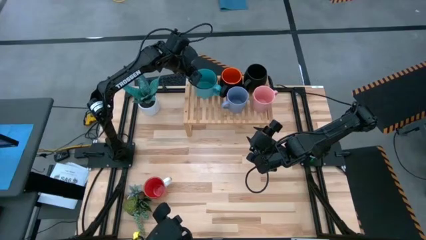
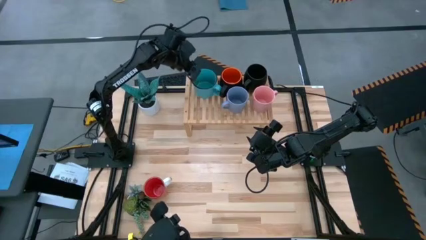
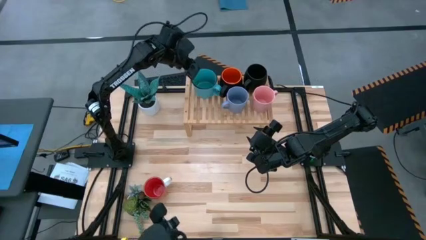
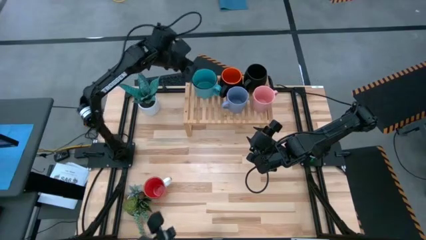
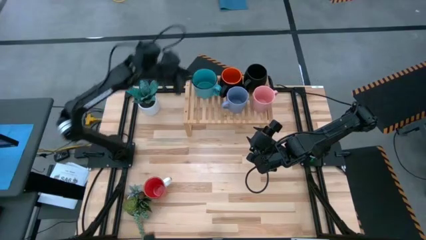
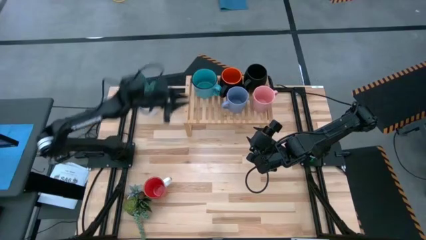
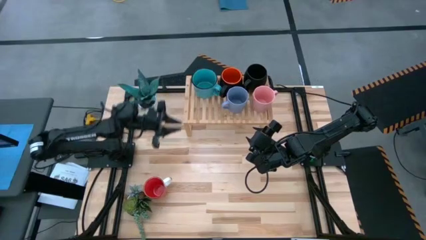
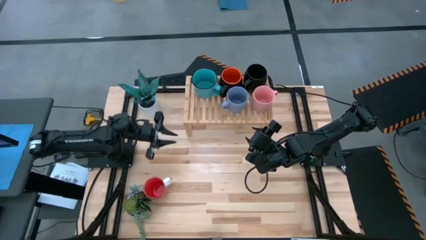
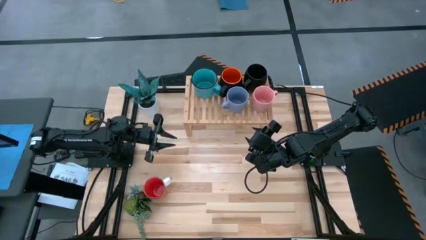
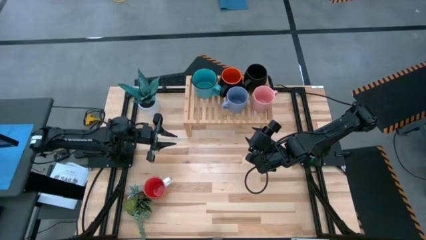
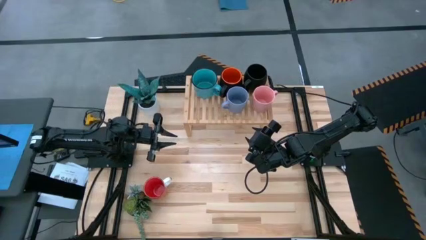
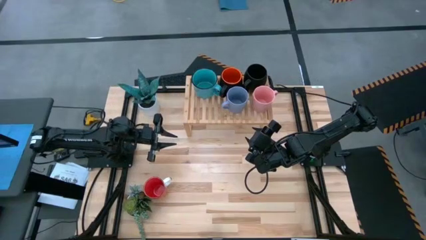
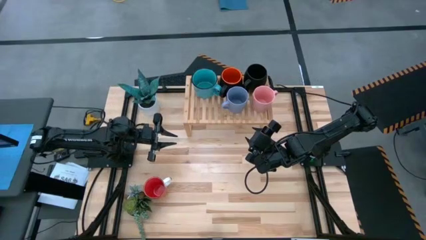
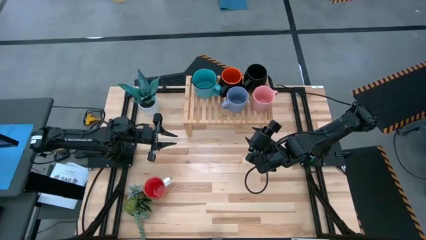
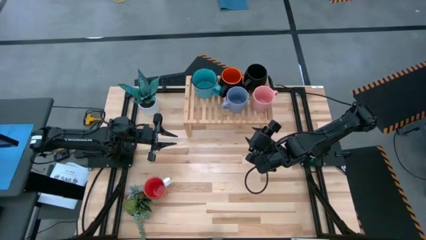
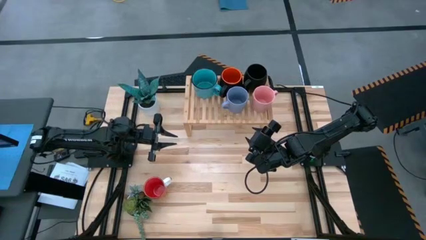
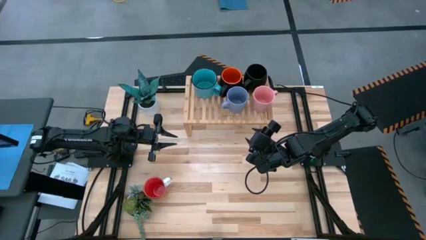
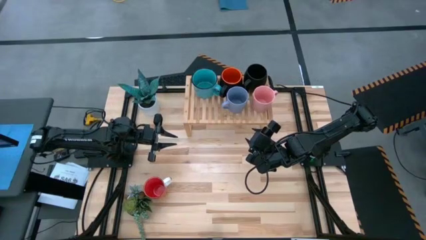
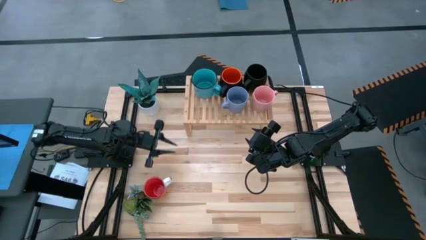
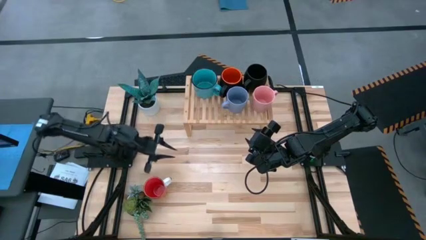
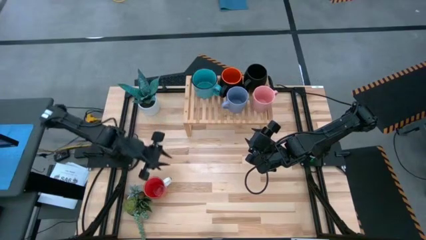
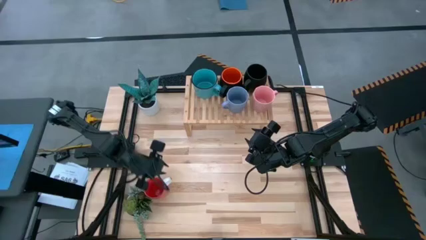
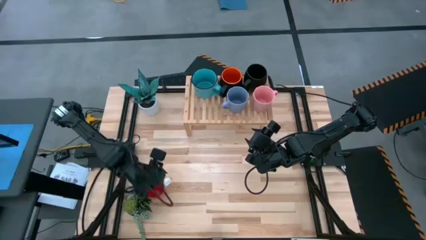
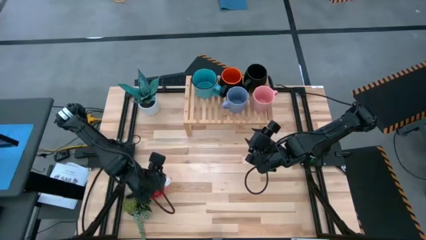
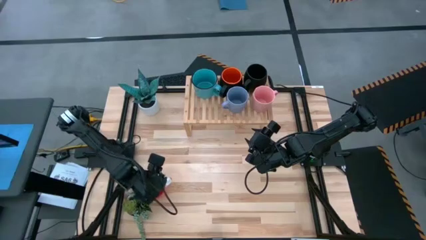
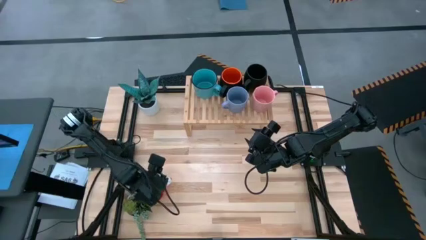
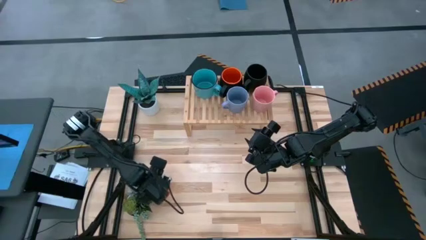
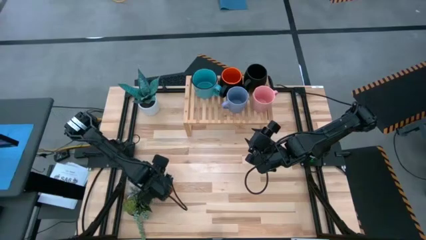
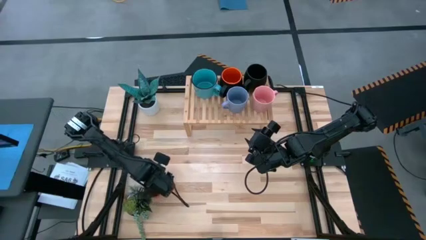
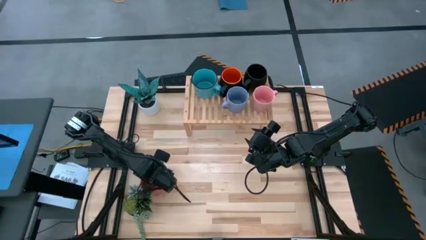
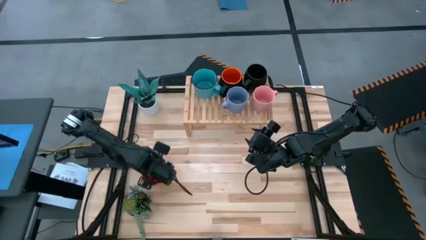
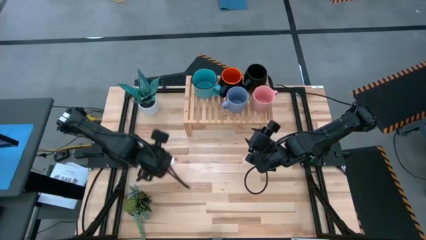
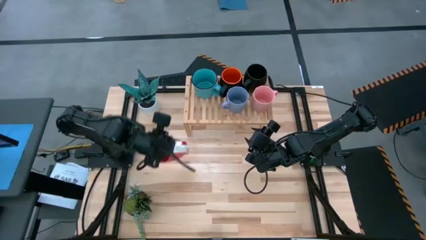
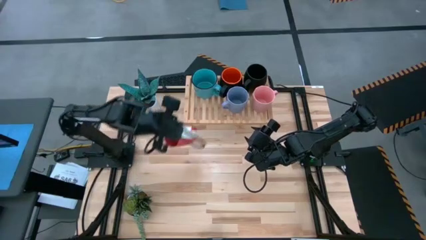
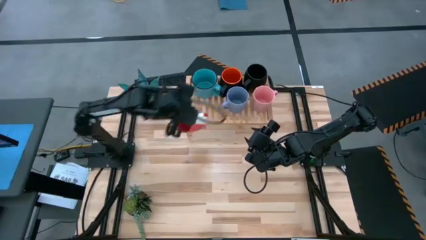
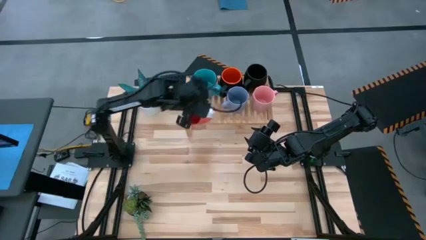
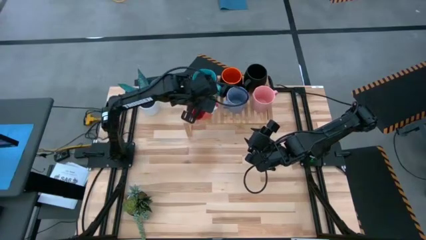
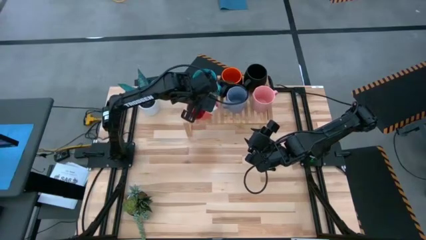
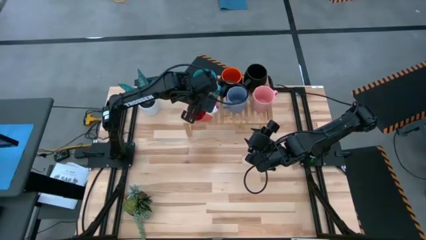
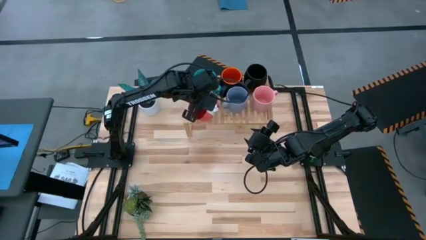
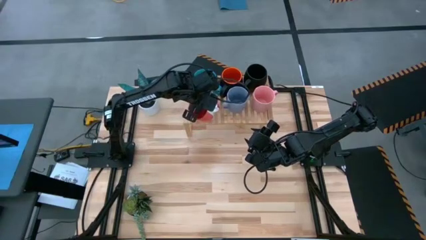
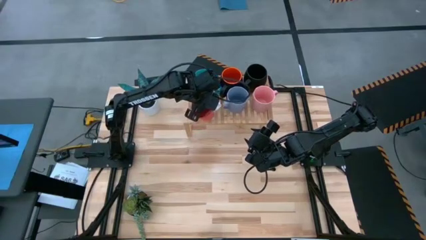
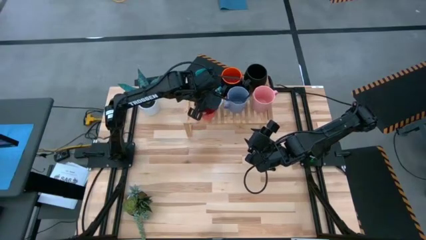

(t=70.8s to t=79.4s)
Task: Place coffee mugs
Put the red mug on the shelf

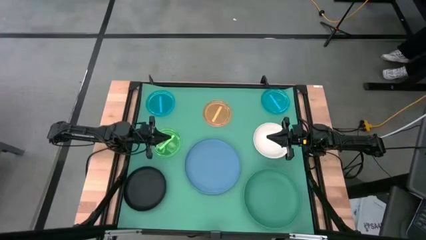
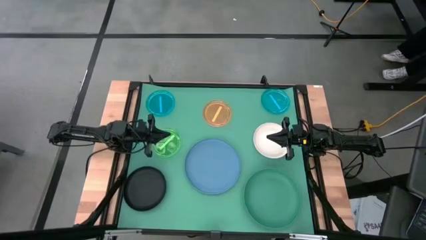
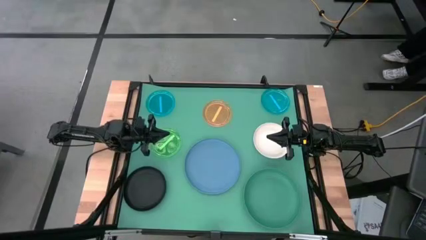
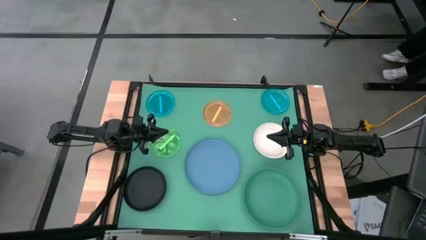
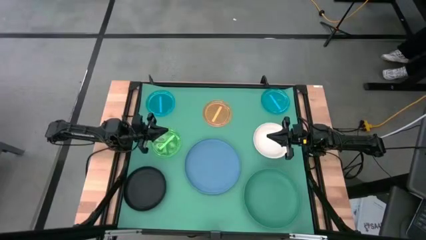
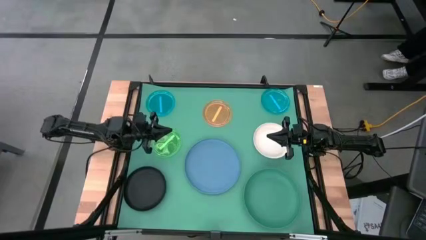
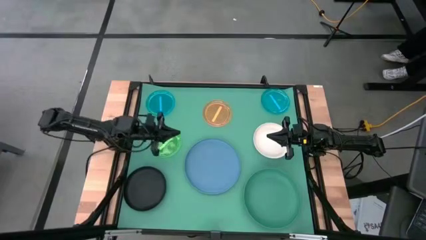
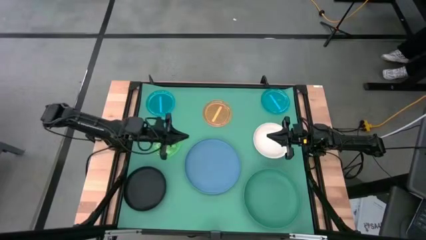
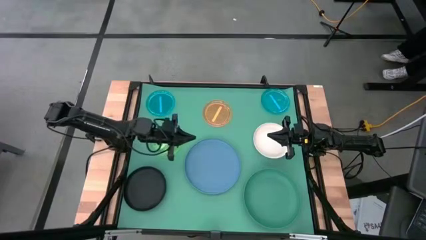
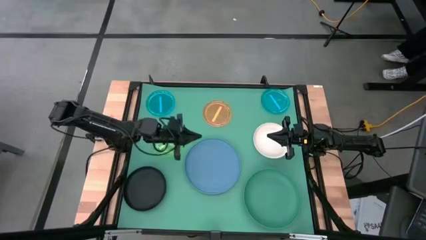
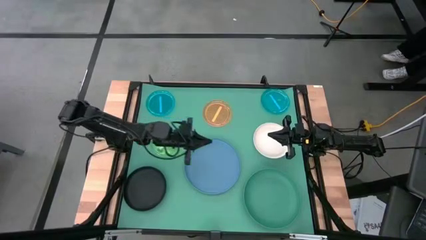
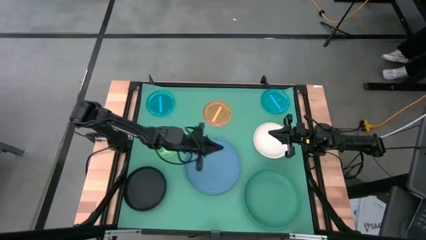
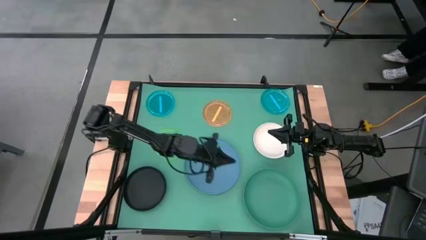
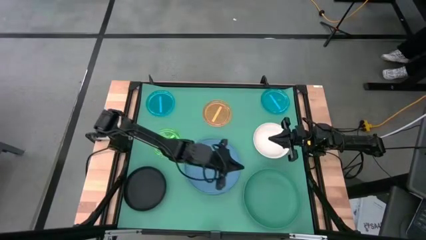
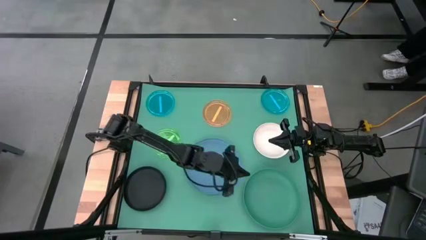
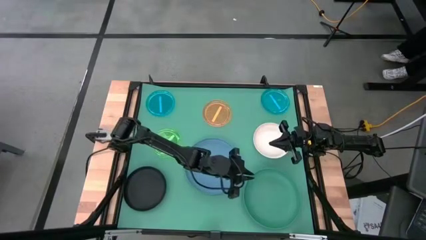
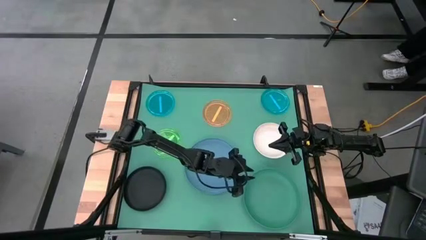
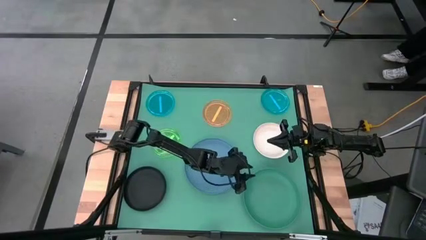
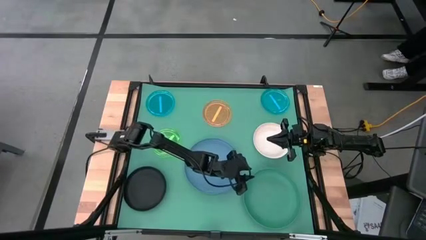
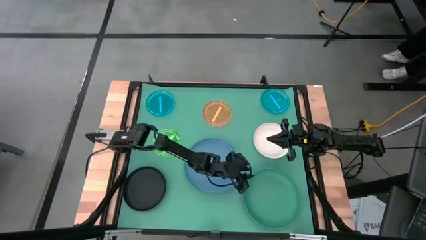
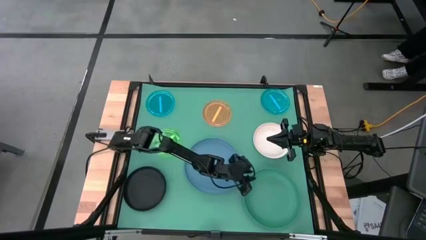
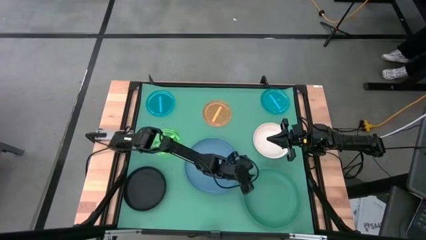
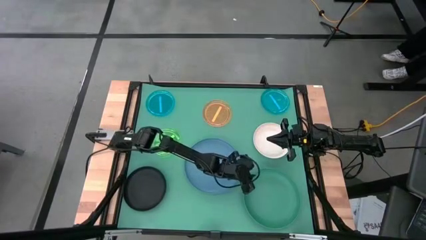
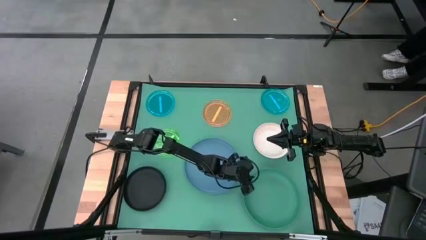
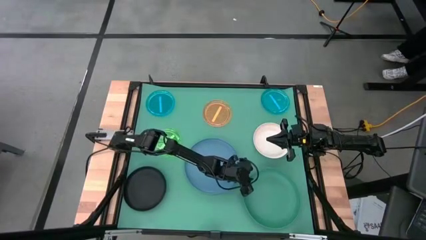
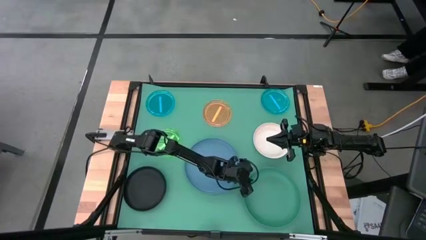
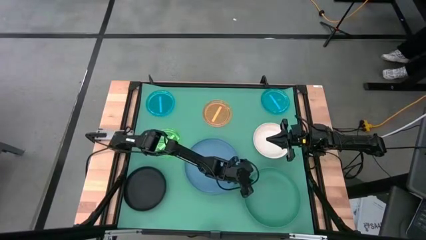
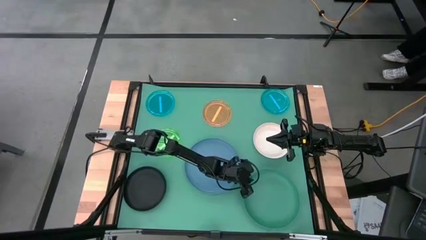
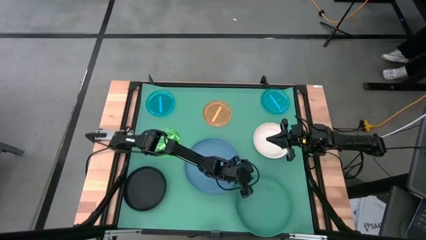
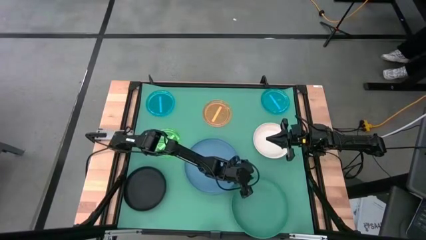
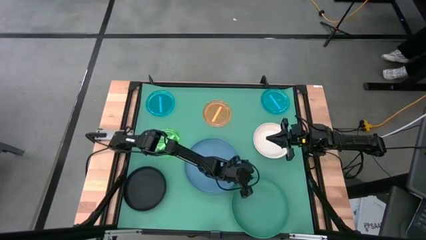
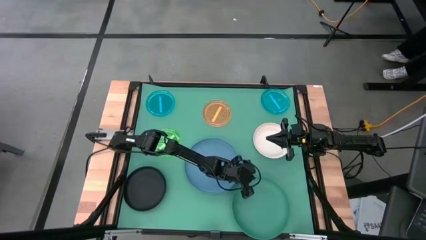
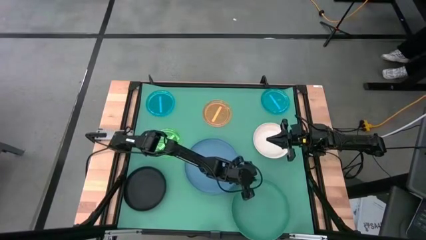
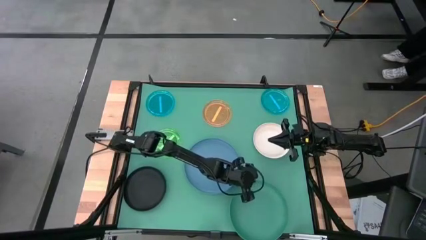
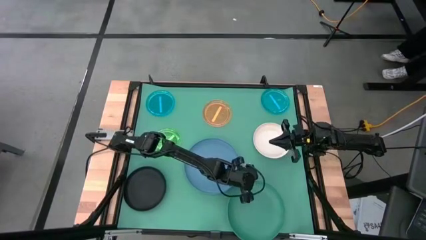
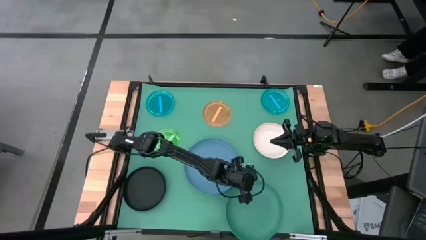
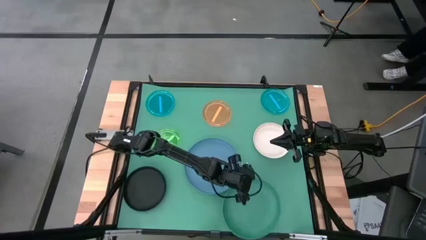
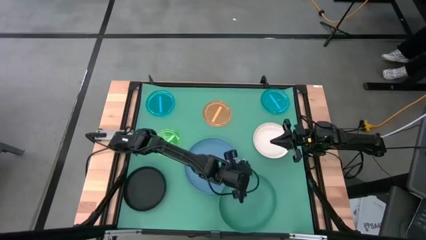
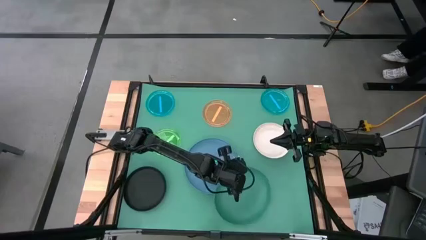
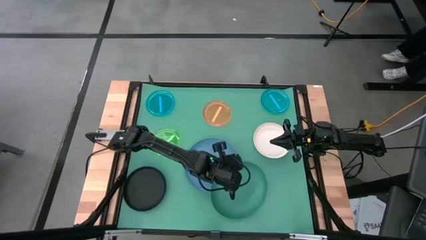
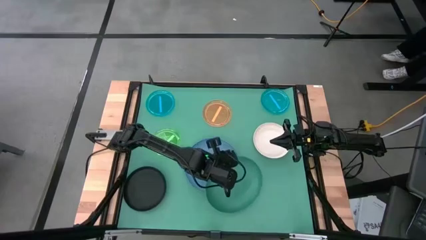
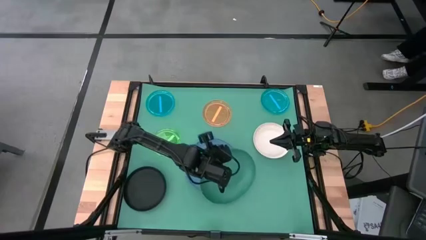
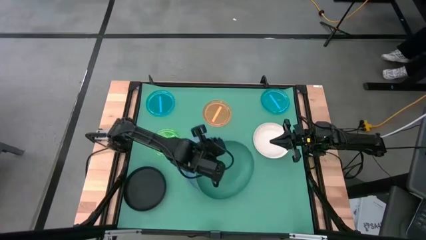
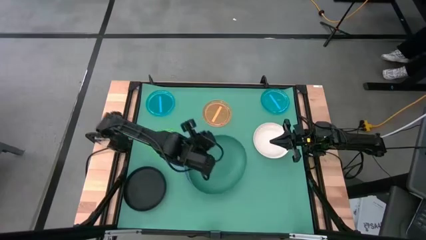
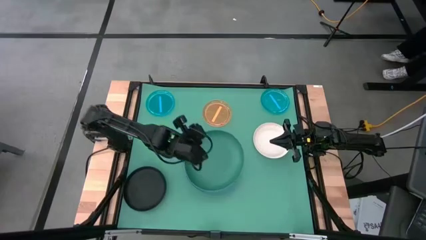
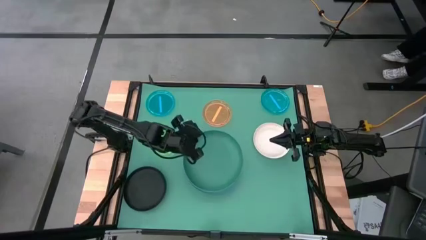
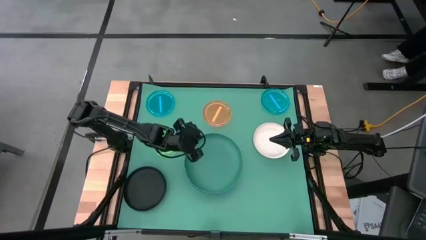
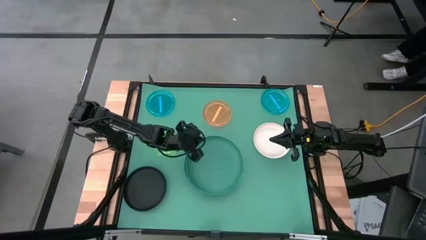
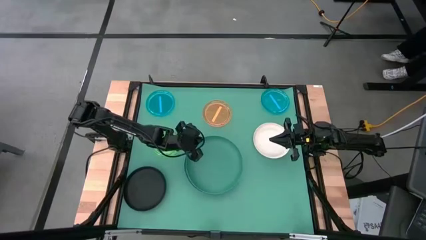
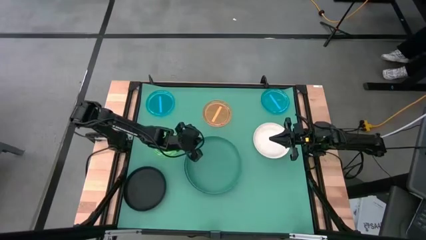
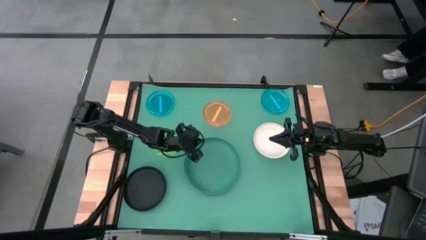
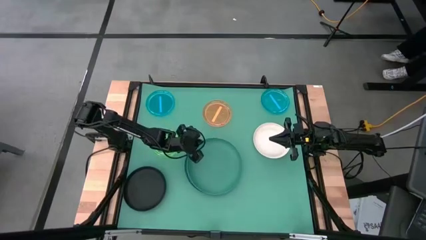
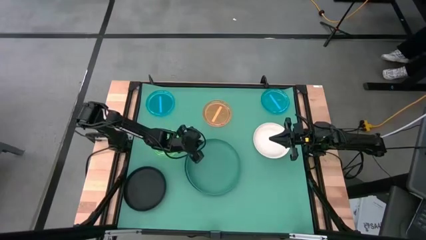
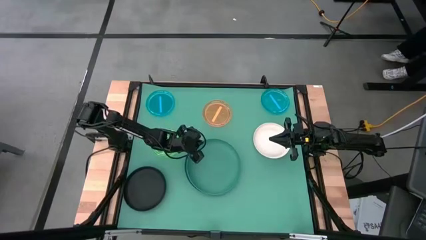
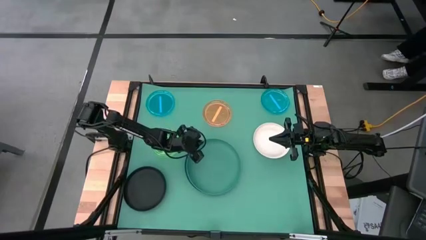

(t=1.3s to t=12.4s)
Task: Stack plastic plates
Stack the green plate on top of the blue plate
